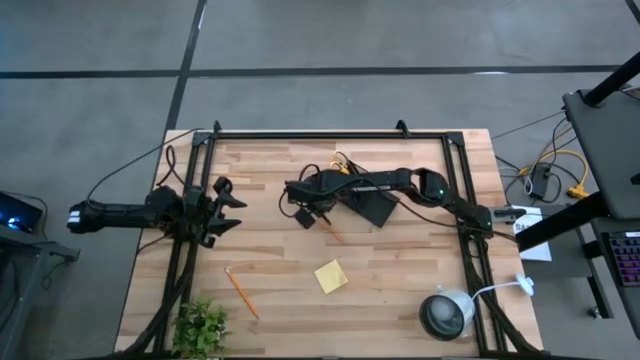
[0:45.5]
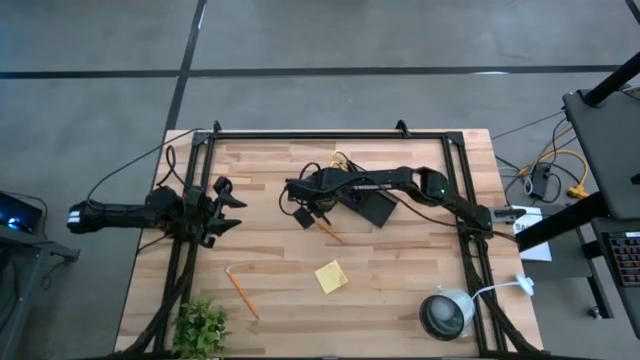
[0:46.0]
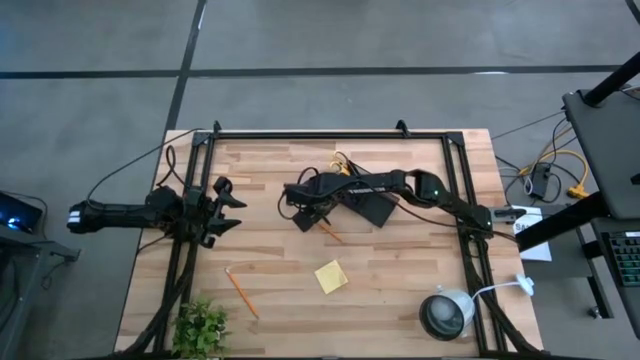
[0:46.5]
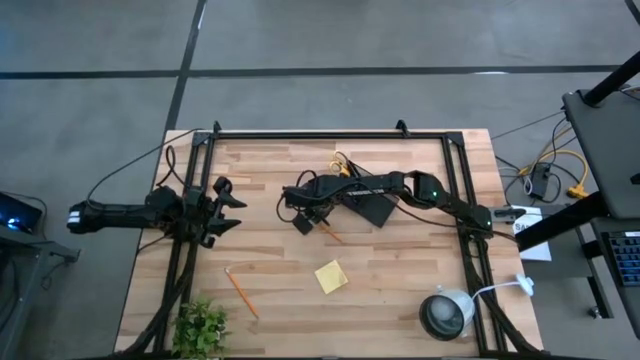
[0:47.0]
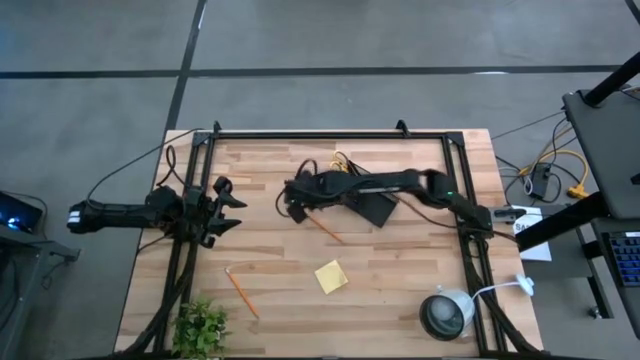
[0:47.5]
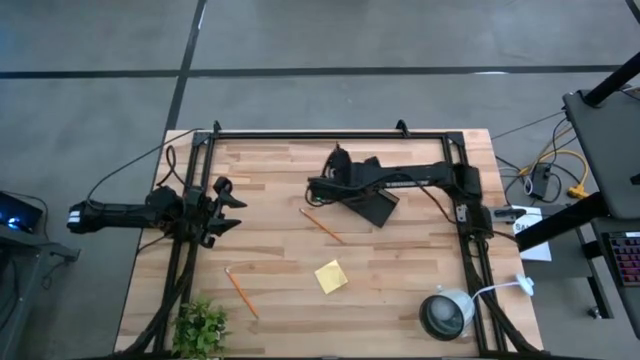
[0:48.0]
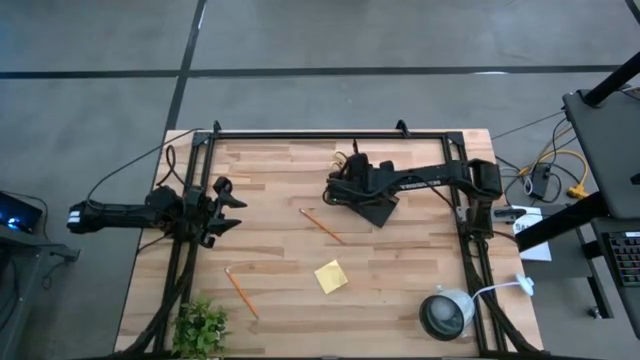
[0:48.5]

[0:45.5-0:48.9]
Task: Pick and place office supplies into organizer
Put the black pen into the black desk organizer

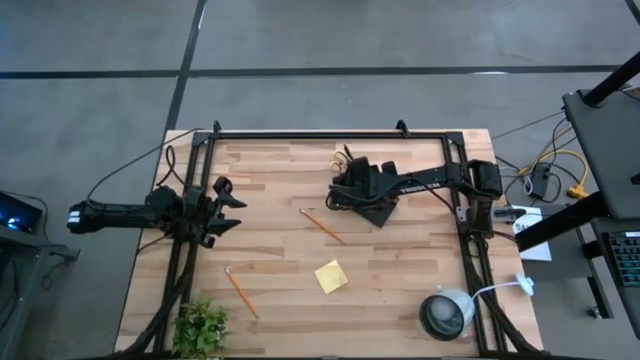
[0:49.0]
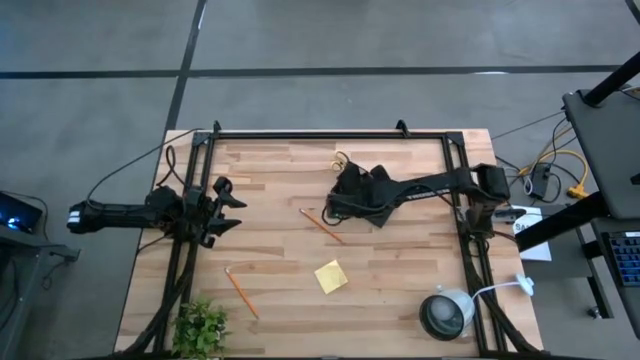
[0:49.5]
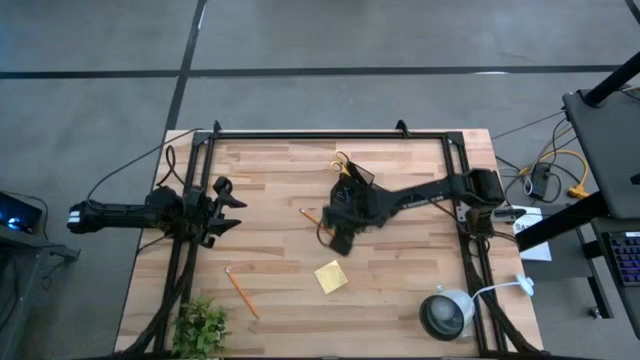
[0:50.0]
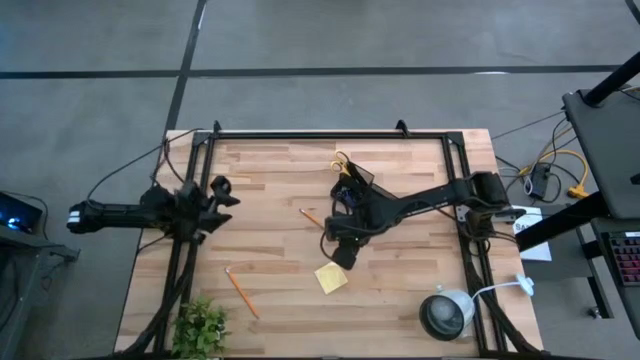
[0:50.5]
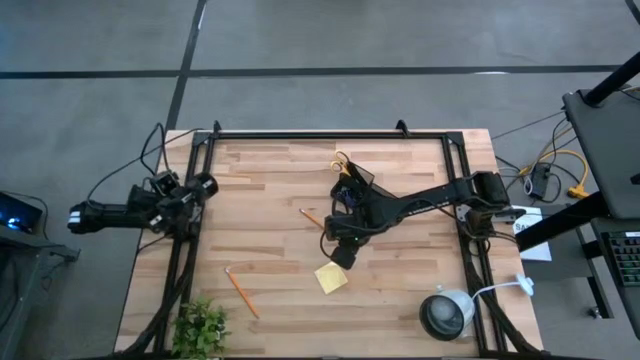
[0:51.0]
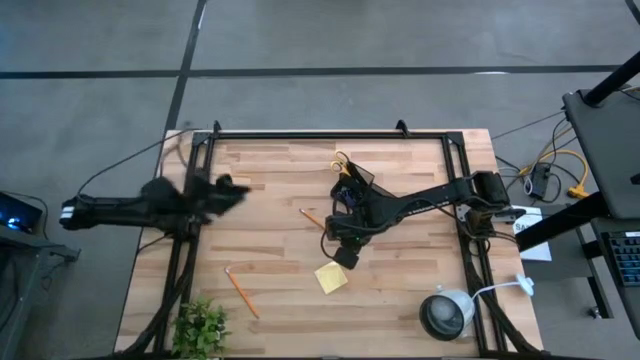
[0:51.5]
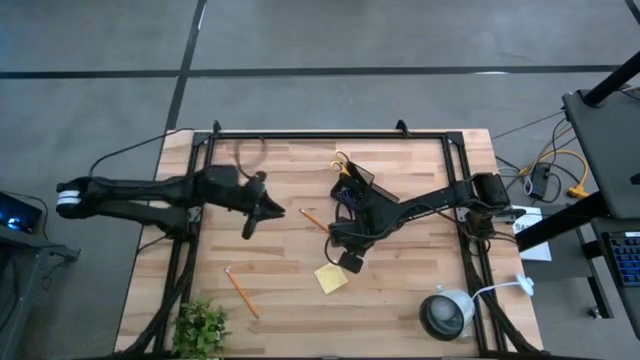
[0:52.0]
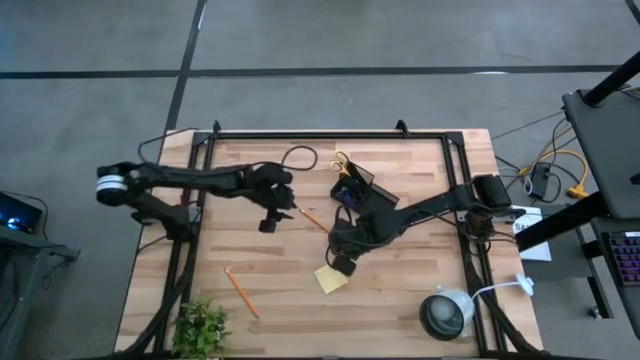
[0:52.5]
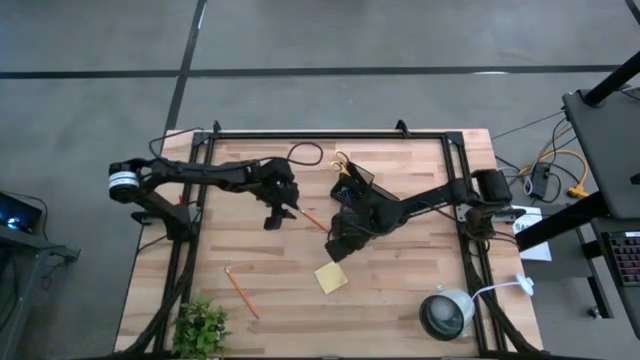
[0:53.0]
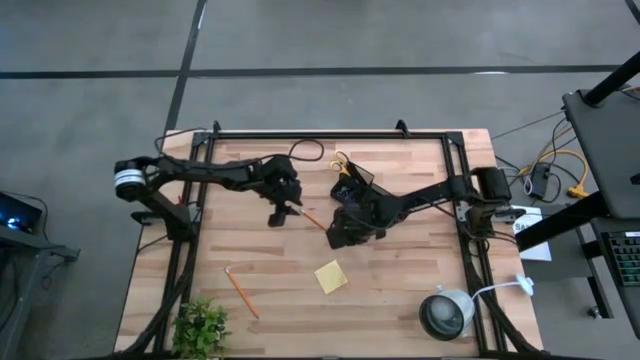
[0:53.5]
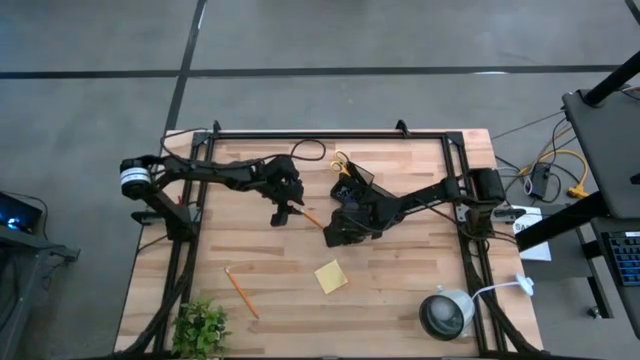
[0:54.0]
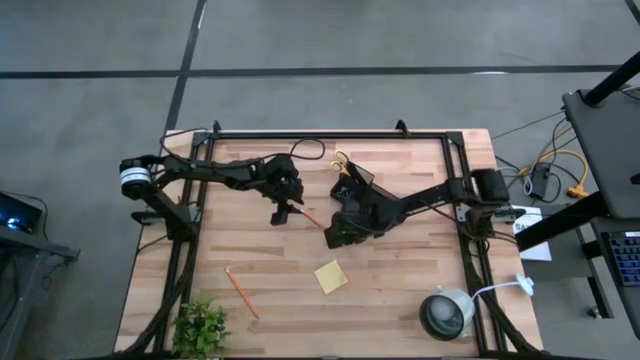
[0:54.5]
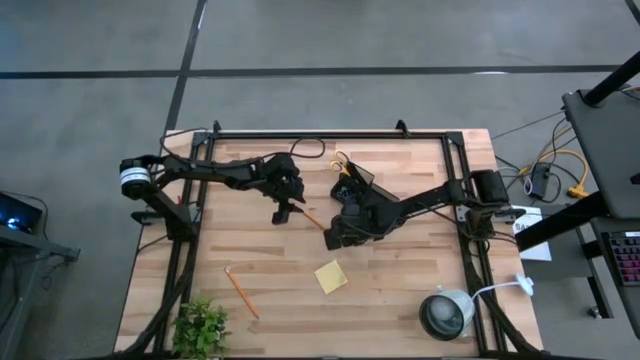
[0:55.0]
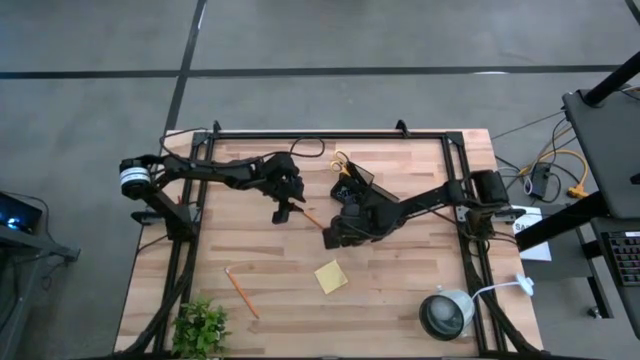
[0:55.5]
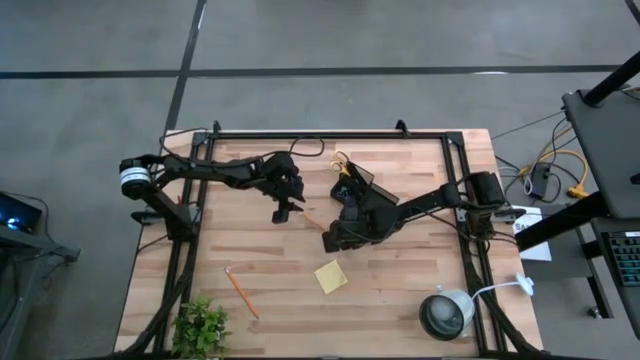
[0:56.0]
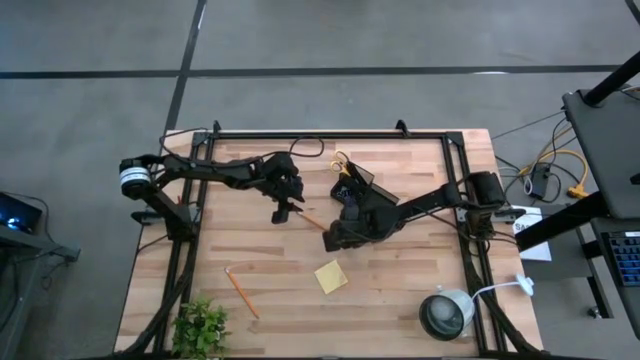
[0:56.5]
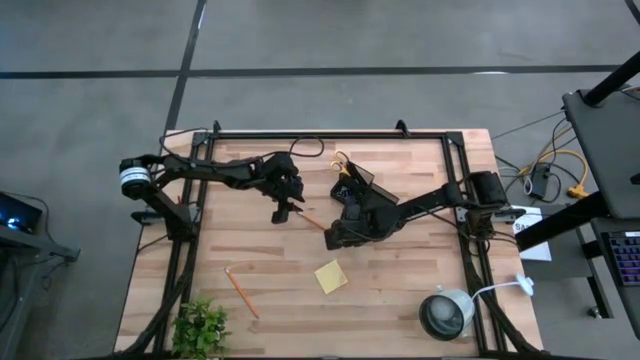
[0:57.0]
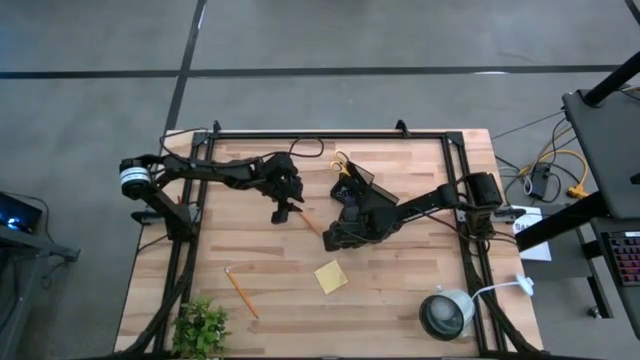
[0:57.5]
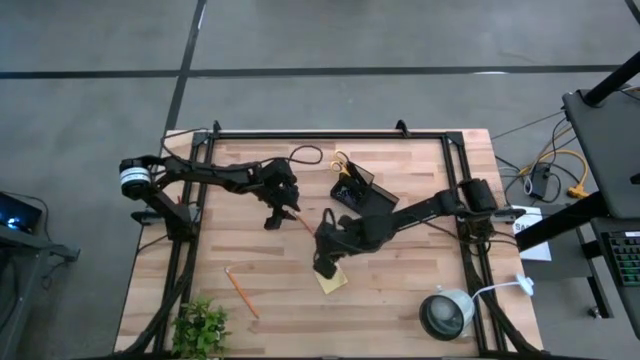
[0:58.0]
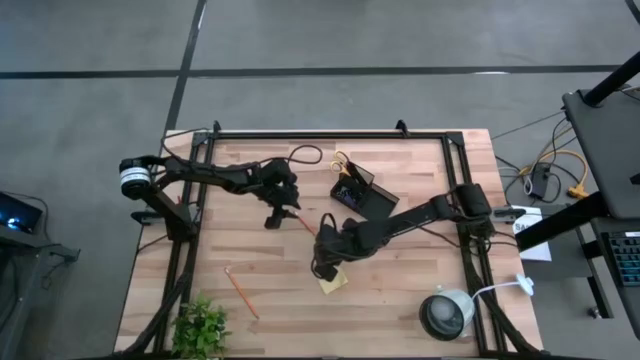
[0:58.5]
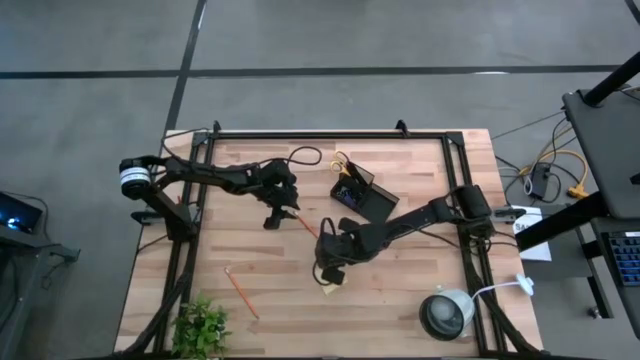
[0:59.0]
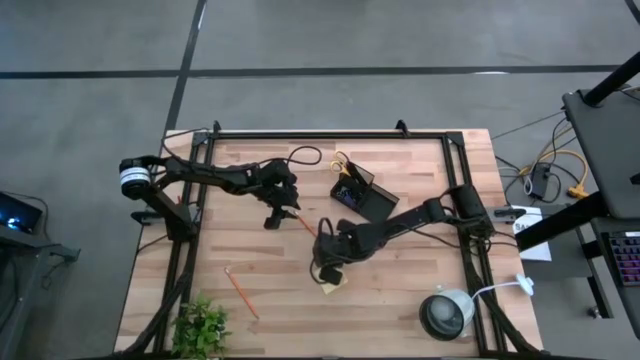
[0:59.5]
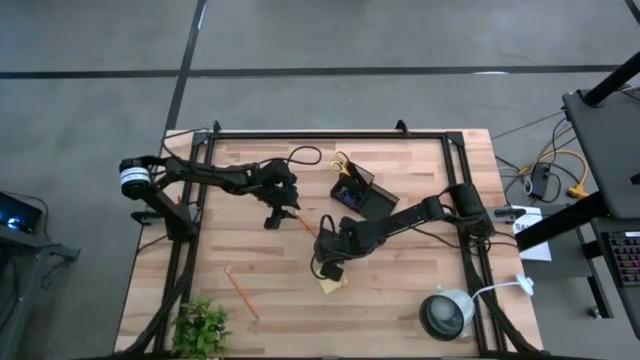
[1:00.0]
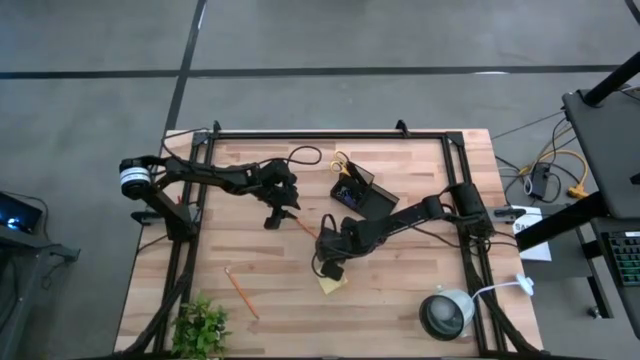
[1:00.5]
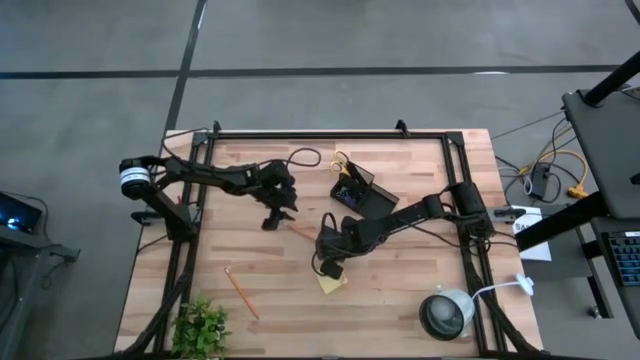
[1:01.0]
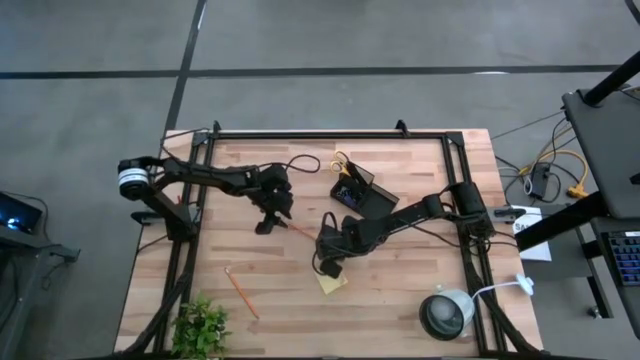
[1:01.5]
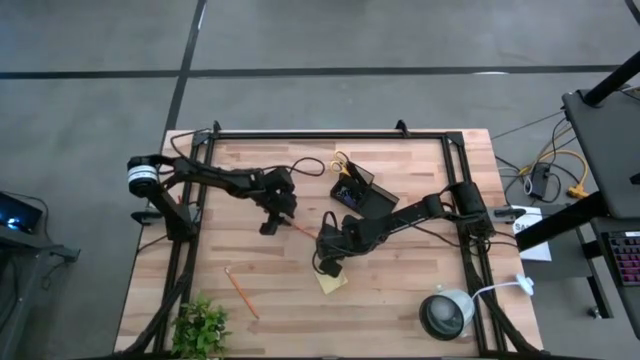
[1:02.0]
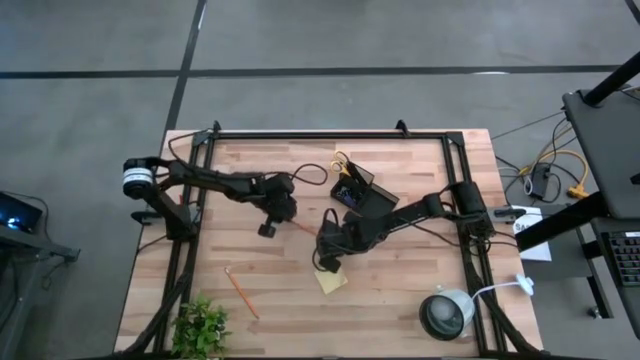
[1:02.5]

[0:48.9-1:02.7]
Put the top yellow pencil into the black desk organizer

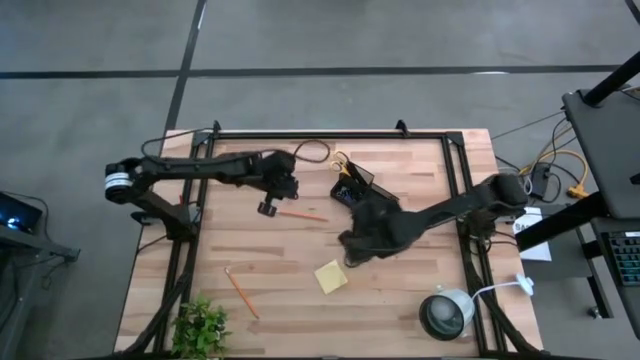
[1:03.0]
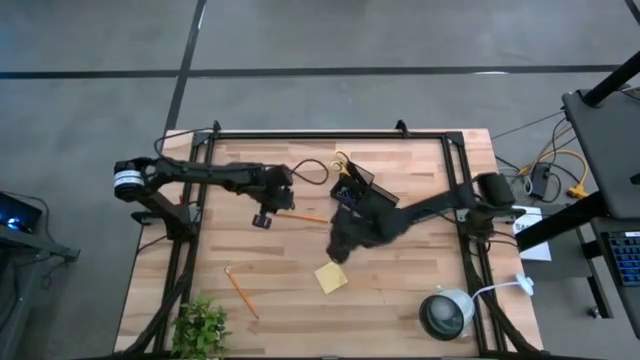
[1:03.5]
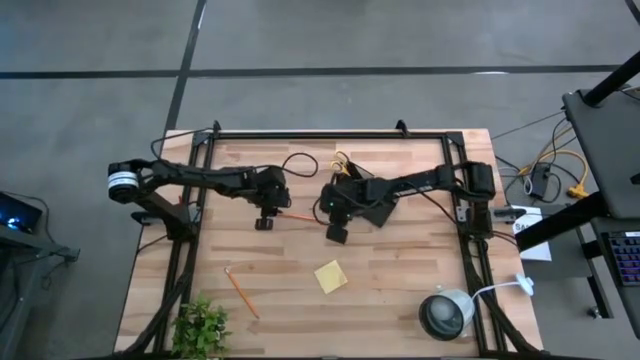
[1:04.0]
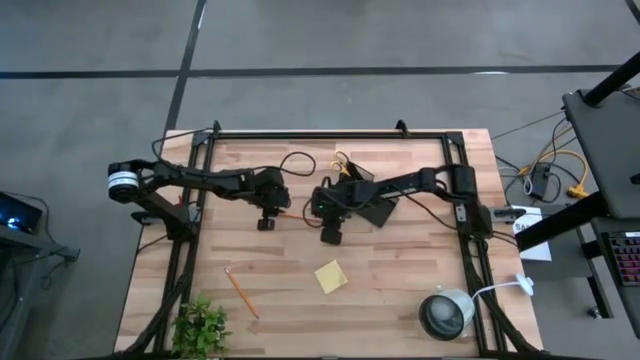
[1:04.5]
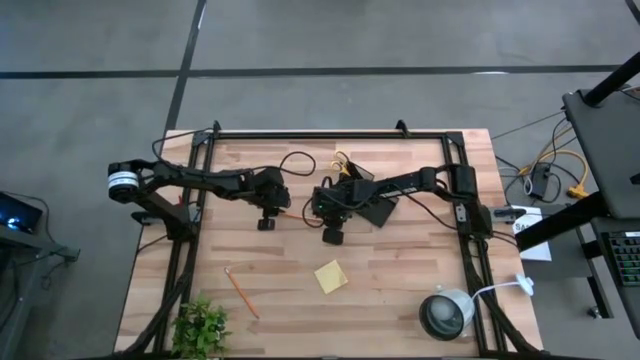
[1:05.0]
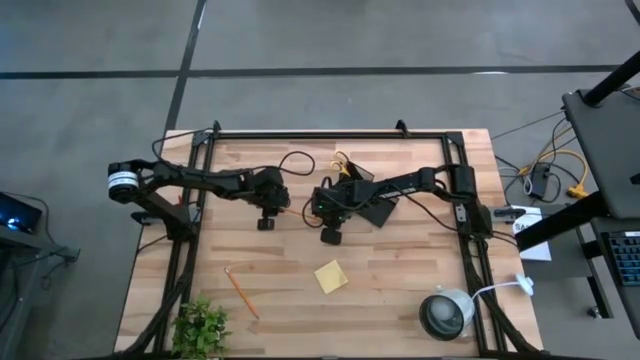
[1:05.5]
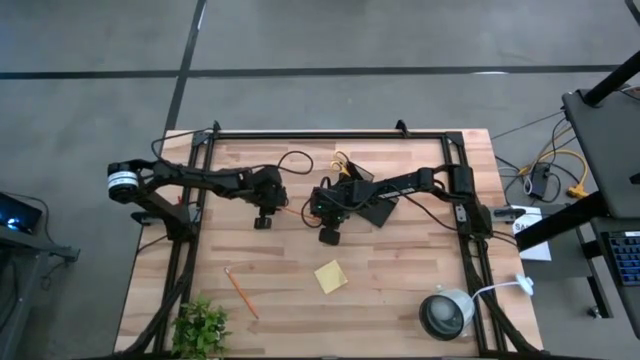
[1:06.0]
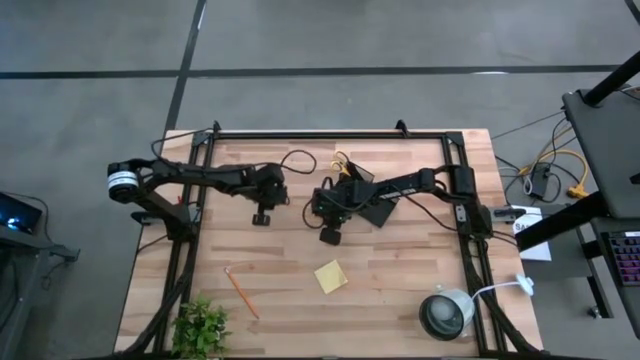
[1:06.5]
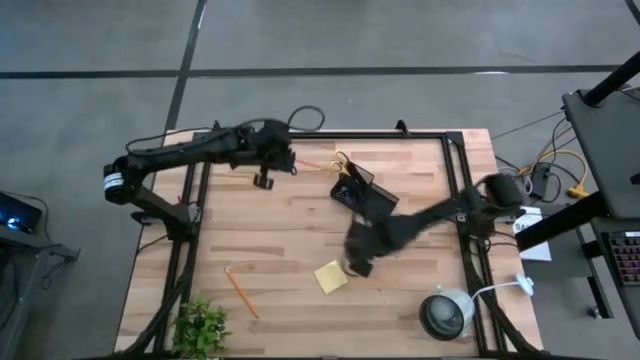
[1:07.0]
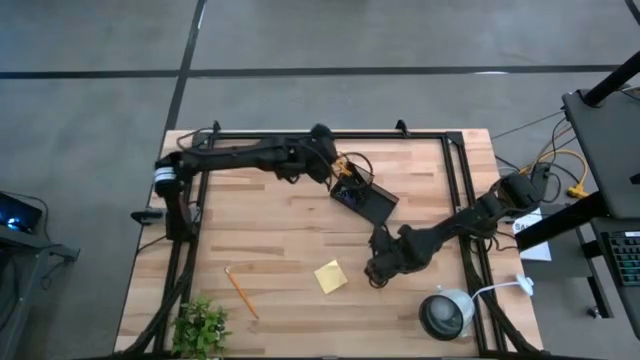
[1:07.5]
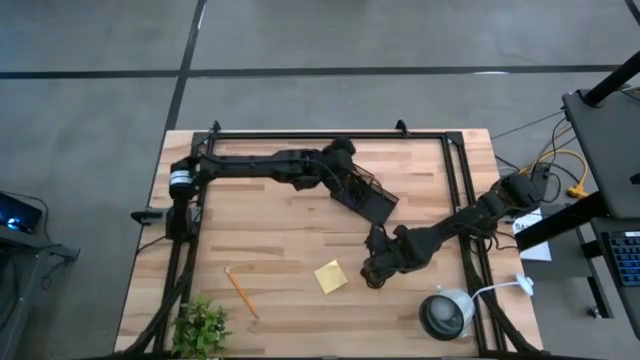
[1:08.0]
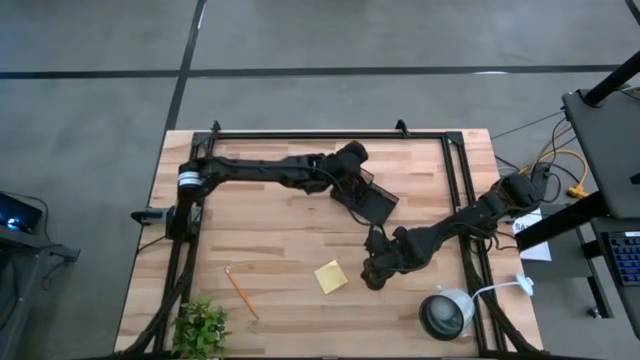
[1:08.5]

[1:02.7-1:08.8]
Put the top yellow pencil into the black desk organizer
